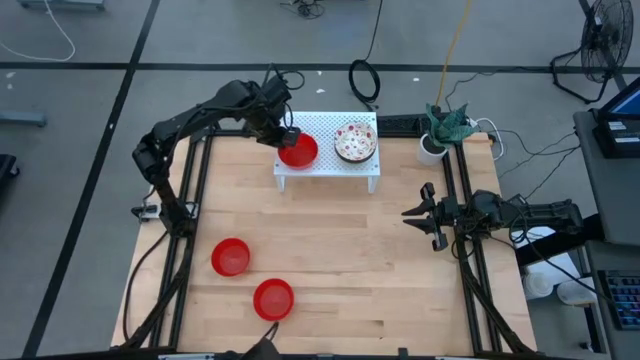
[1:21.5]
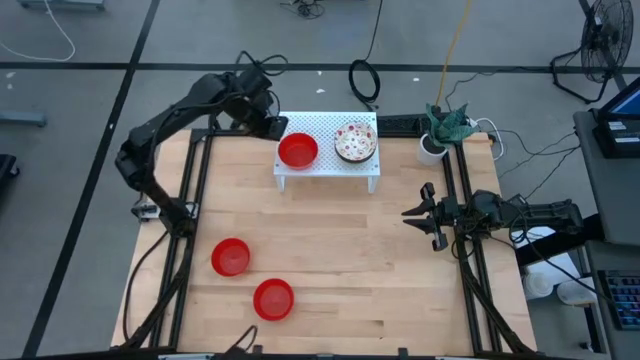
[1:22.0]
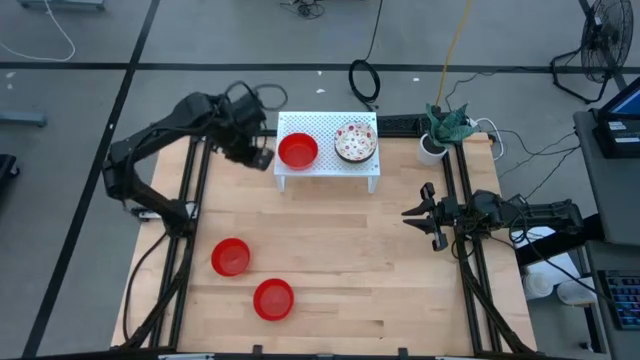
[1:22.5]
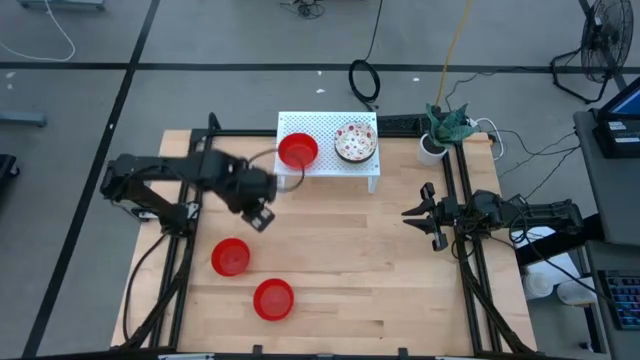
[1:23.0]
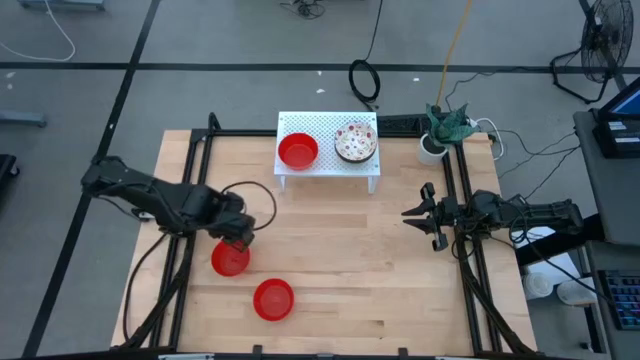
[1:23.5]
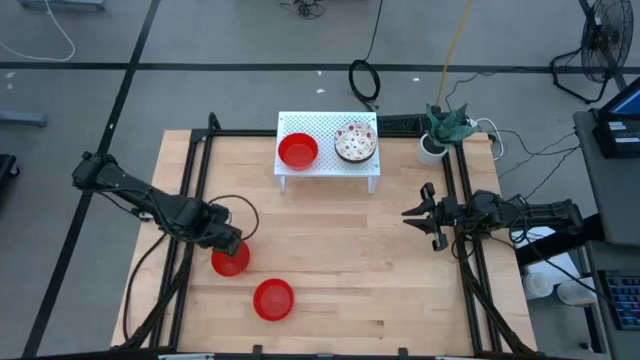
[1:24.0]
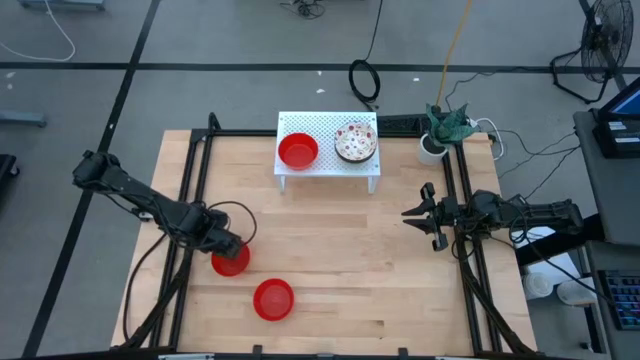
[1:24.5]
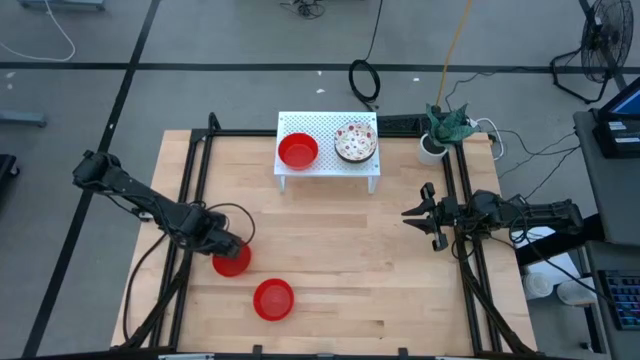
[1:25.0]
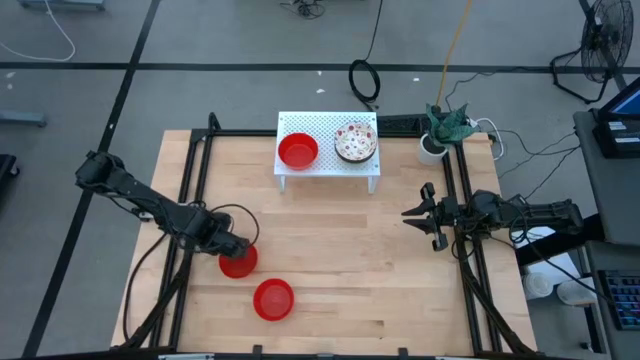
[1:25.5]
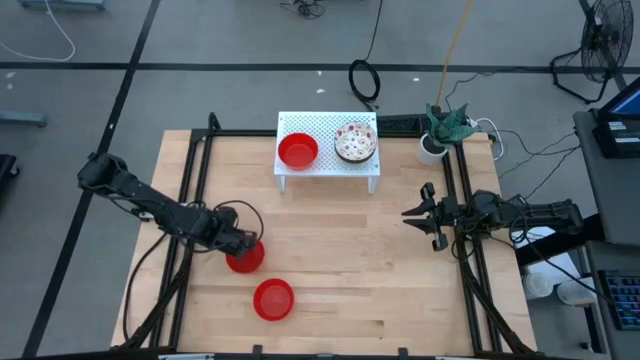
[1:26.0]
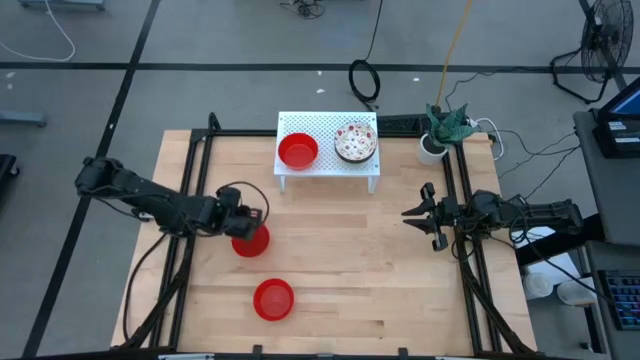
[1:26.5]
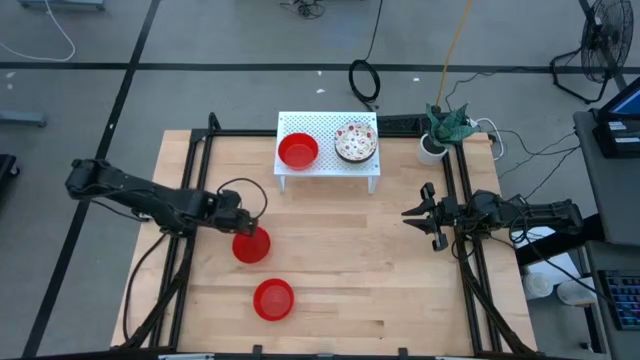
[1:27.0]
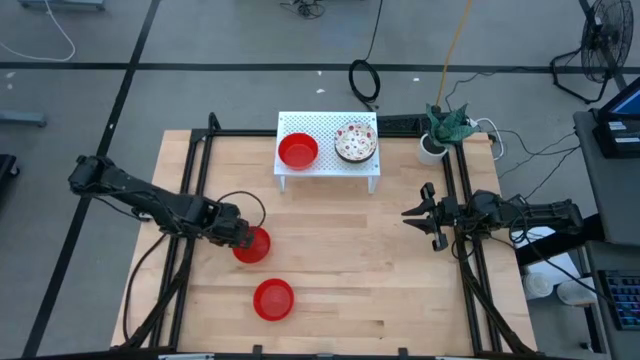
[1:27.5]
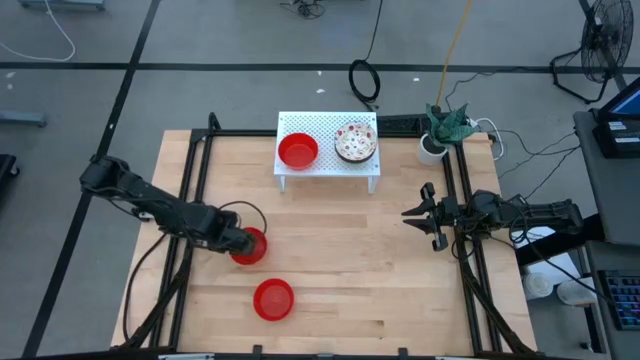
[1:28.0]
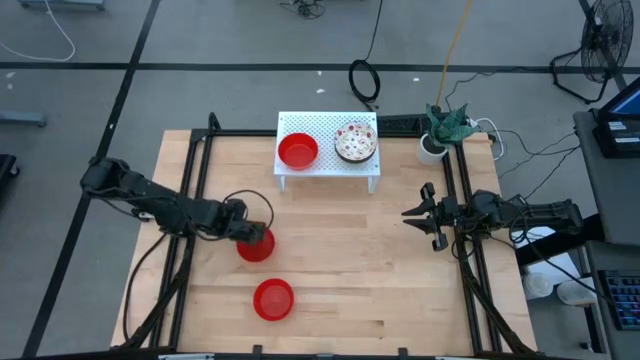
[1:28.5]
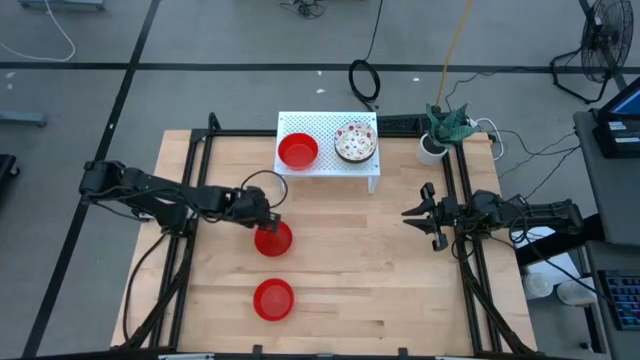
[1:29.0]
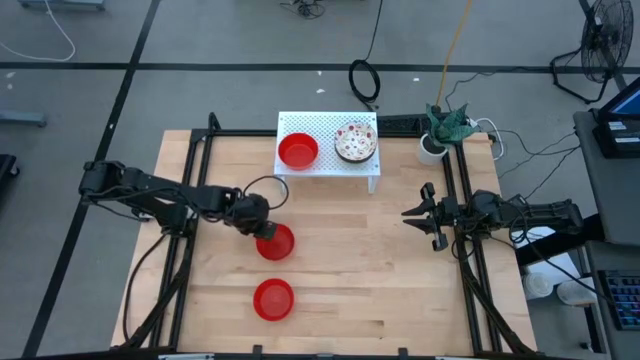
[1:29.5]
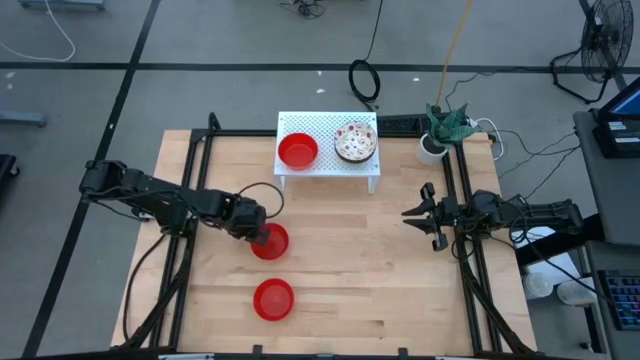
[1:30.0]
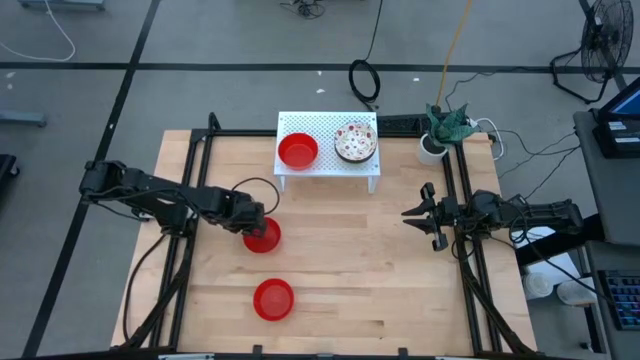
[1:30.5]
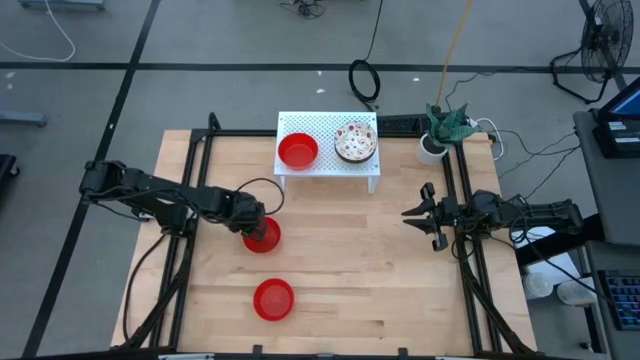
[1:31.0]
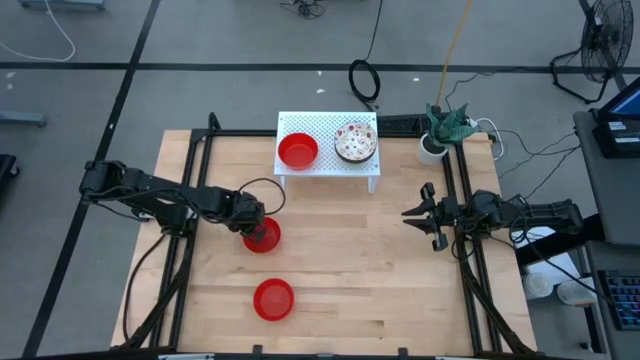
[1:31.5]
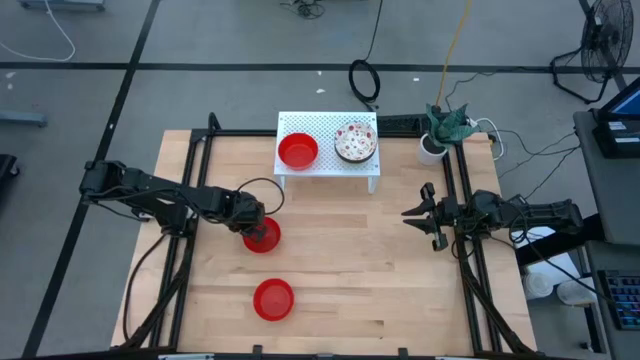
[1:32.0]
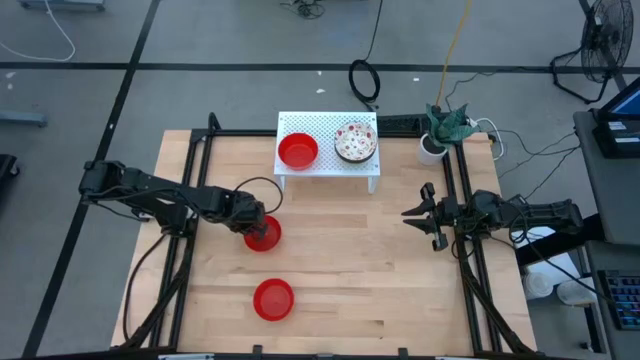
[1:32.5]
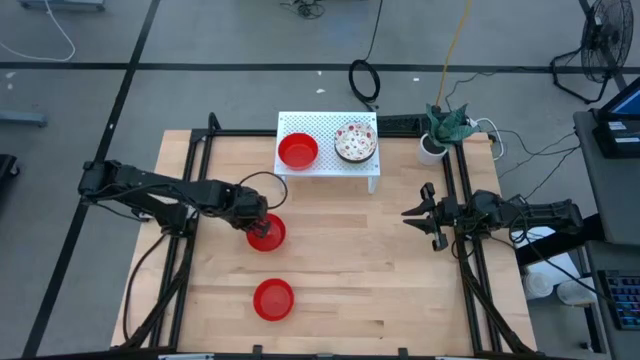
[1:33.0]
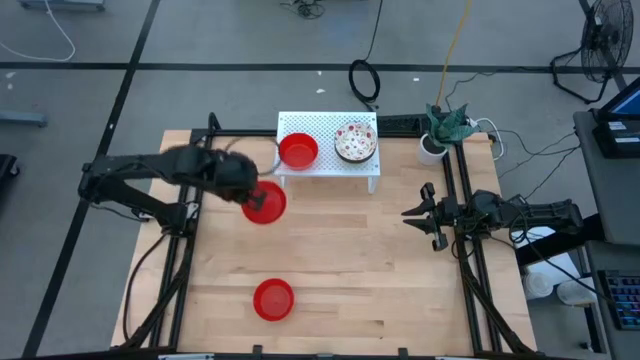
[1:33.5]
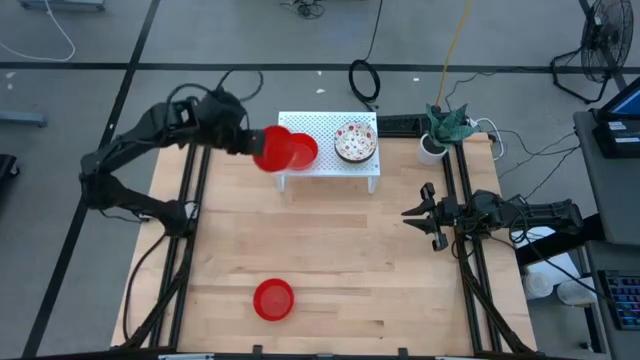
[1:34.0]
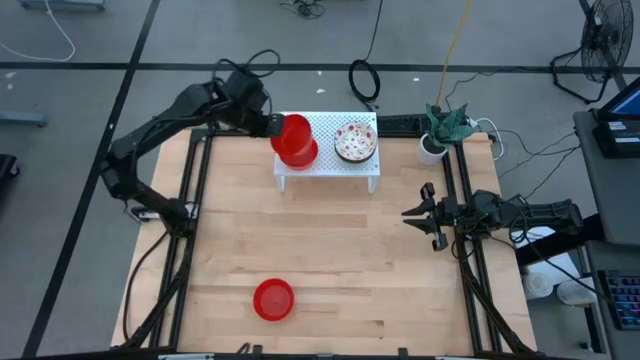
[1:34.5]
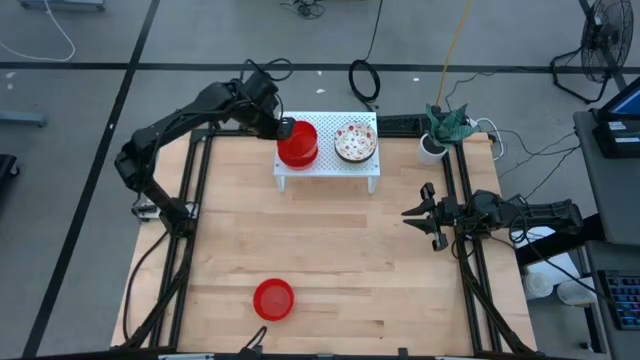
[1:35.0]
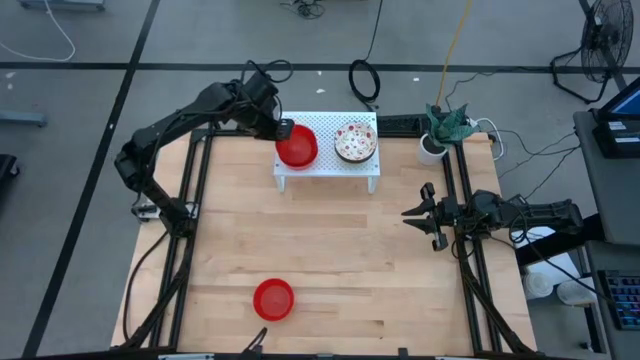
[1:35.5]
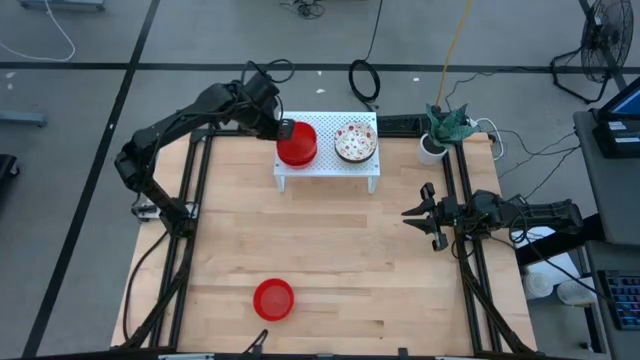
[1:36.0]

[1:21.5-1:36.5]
Task: Pick & Place Mini bowls
Stack the top red bowl on the red bowl on the shelf

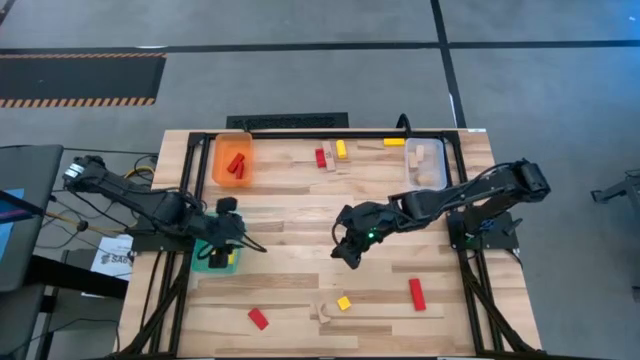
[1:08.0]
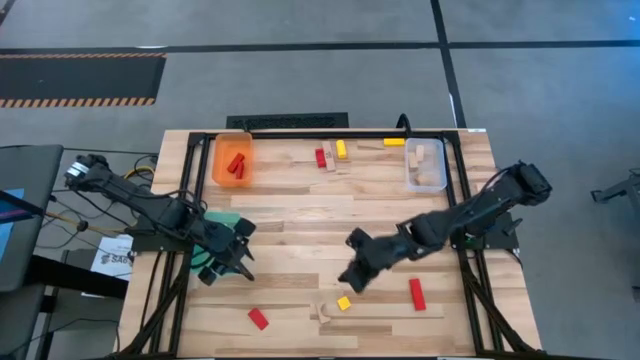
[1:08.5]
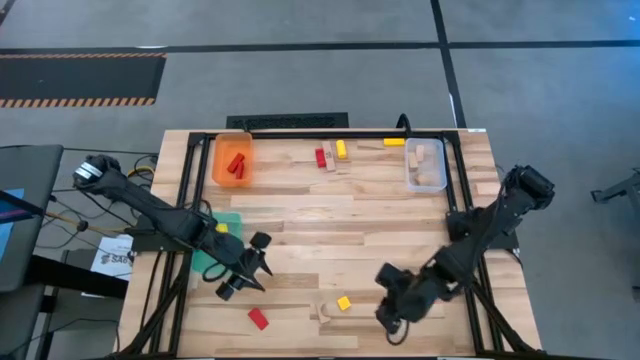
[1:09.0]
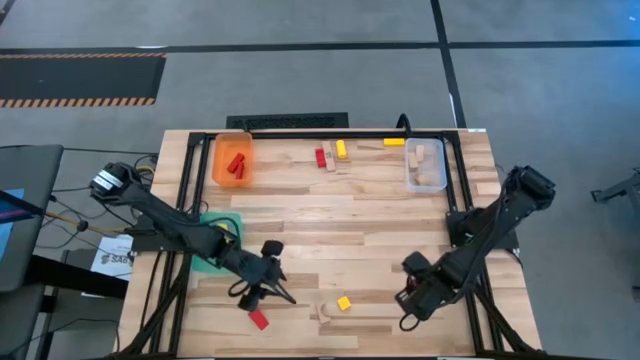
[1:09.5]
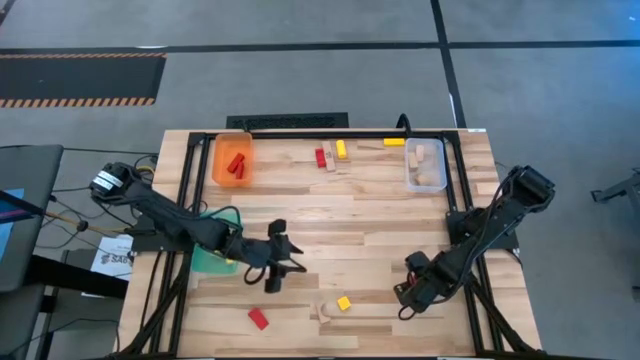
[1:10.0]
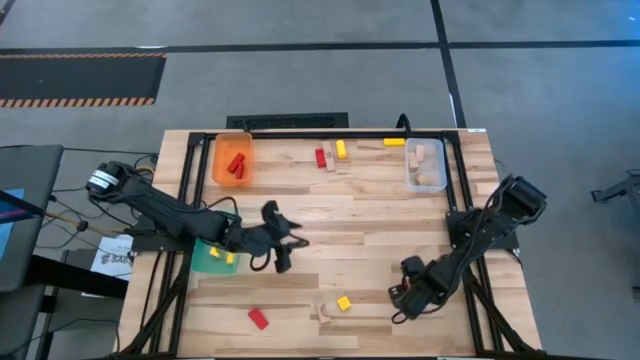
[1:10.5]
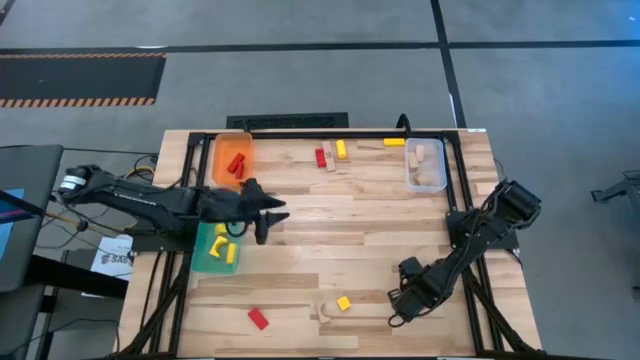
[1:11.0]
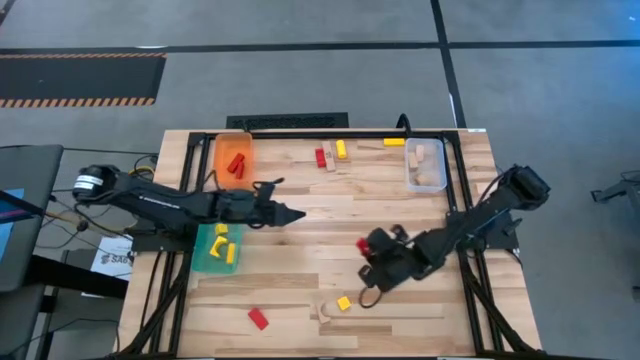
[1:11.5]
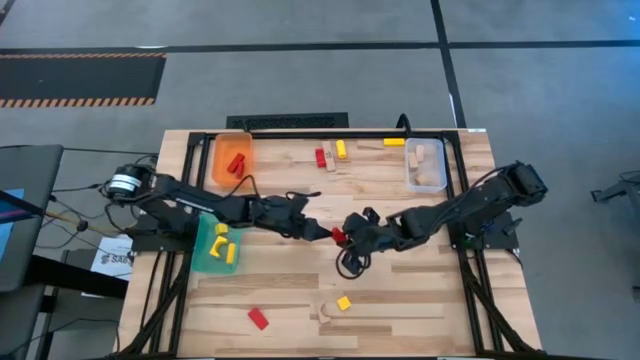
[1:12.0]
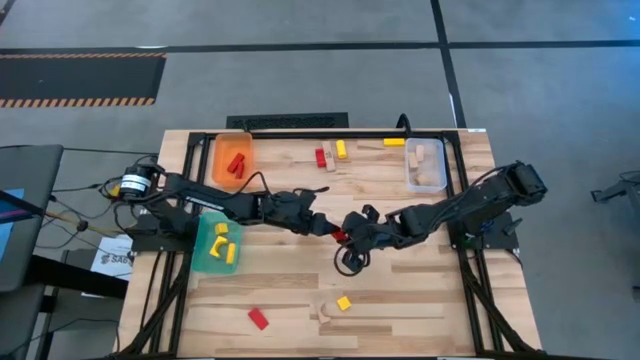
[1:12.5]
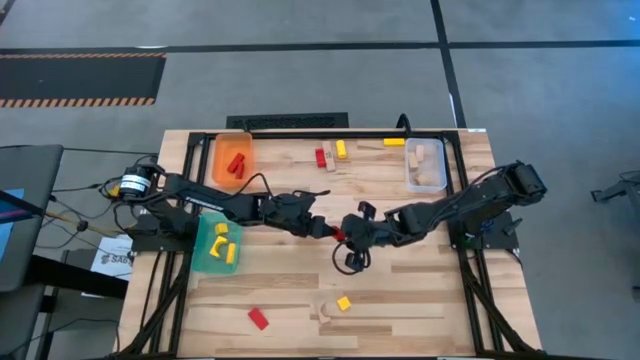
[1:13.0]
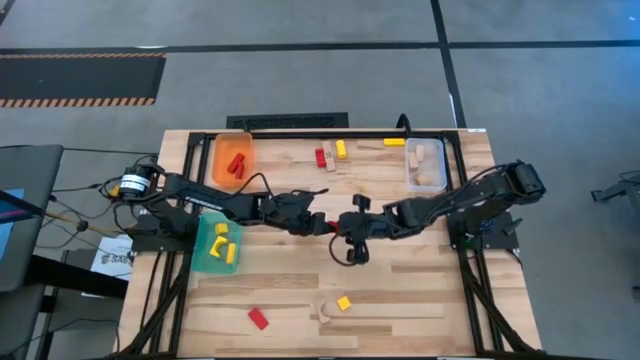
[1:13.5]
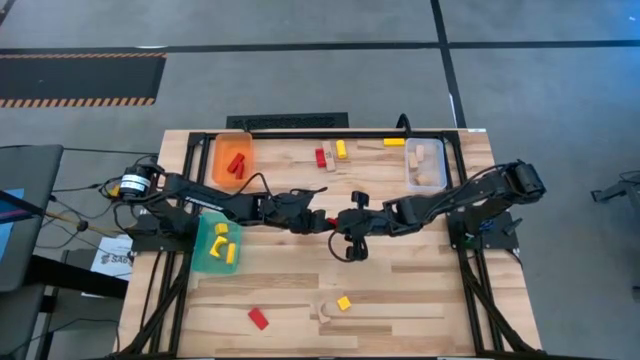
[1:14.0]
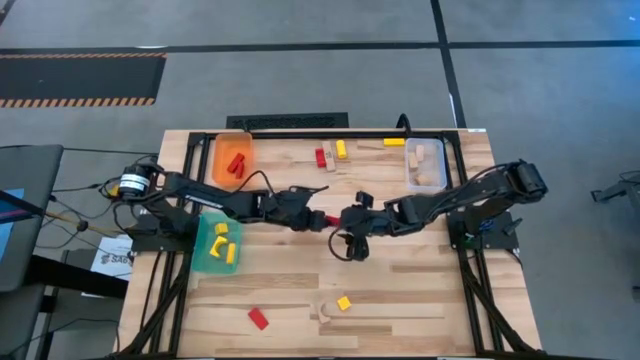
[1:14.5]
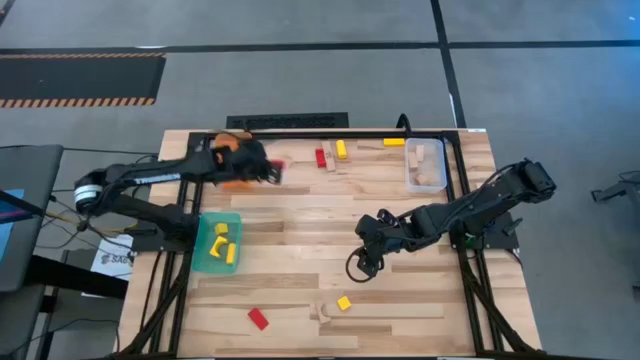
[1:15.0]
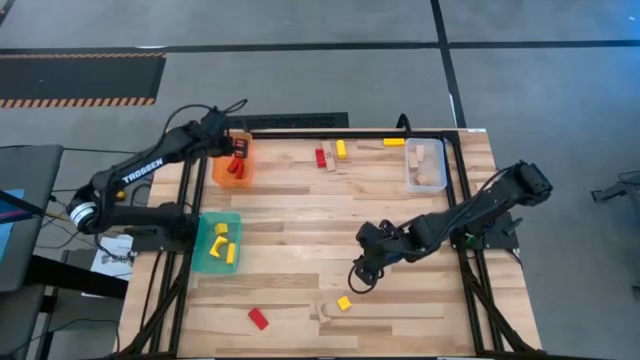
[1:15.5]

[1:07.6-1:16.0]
Task: Sort & place blocks by color
Put the red wooden block into the orange bin
